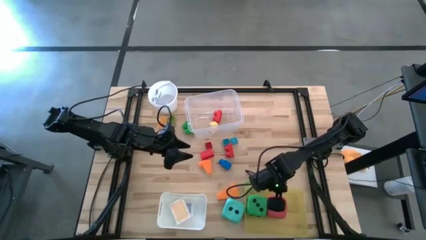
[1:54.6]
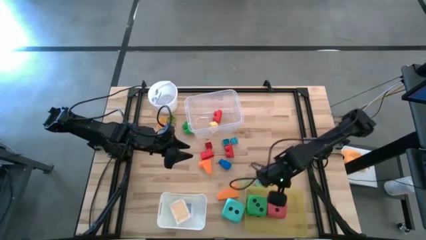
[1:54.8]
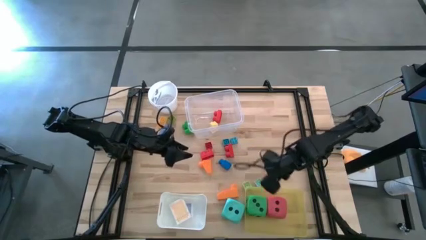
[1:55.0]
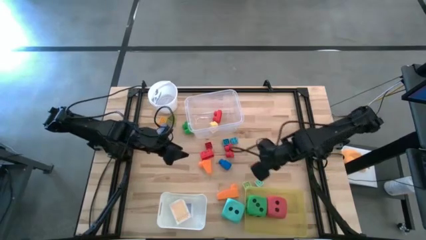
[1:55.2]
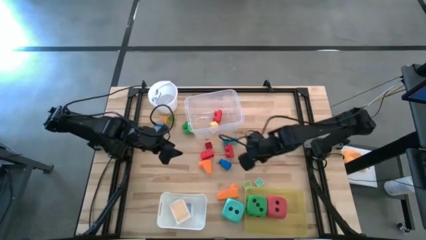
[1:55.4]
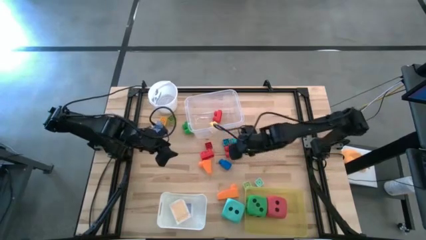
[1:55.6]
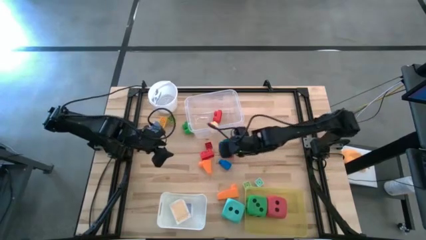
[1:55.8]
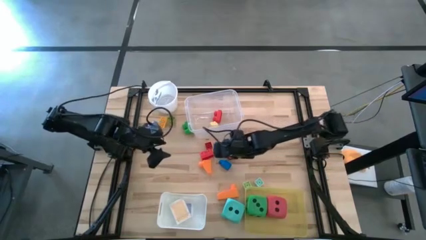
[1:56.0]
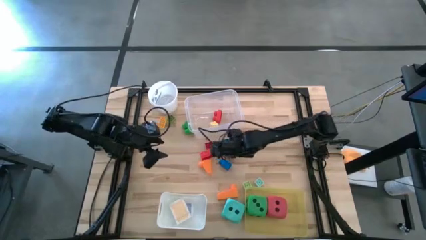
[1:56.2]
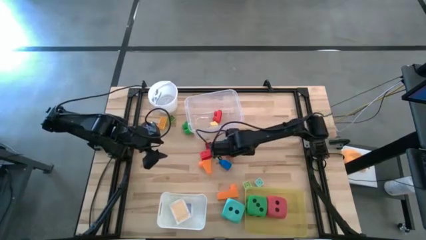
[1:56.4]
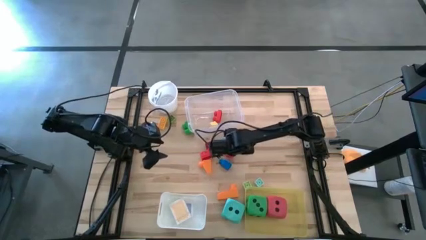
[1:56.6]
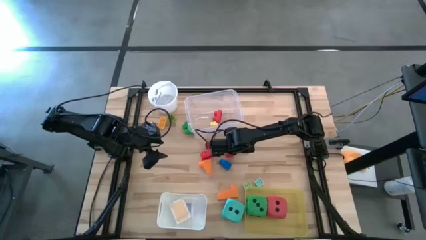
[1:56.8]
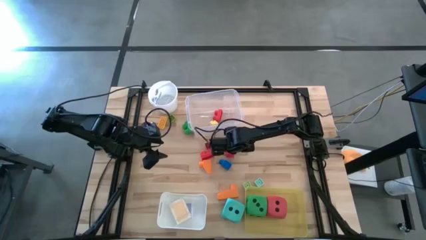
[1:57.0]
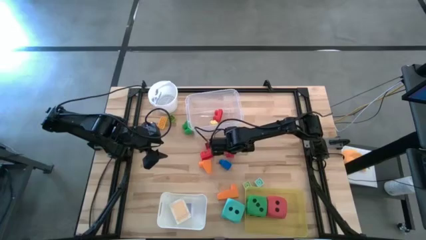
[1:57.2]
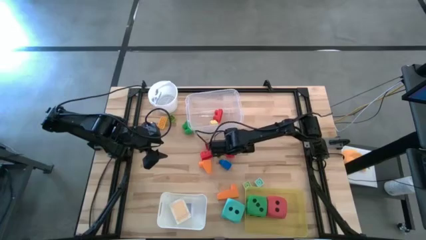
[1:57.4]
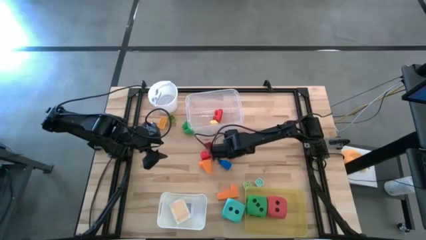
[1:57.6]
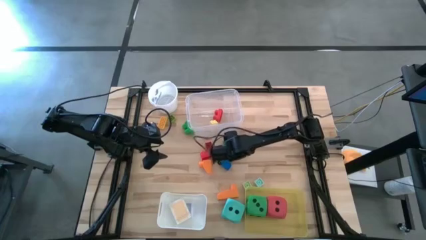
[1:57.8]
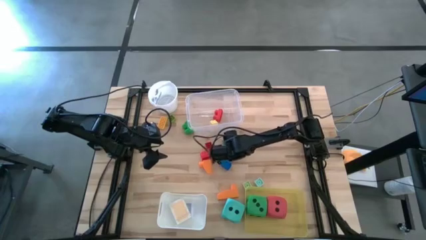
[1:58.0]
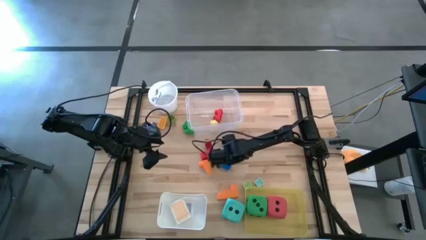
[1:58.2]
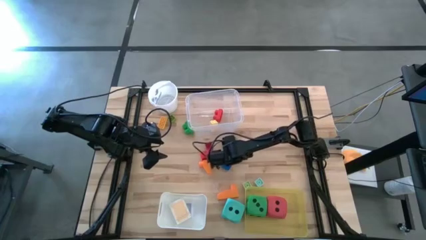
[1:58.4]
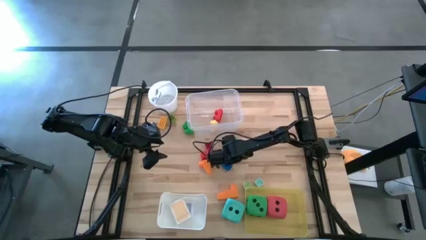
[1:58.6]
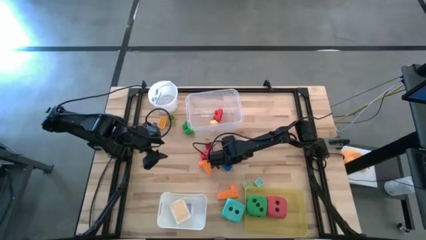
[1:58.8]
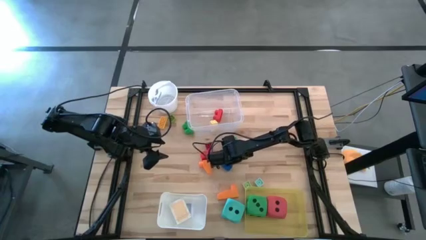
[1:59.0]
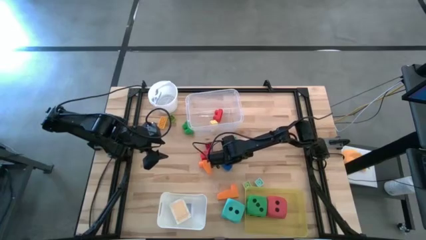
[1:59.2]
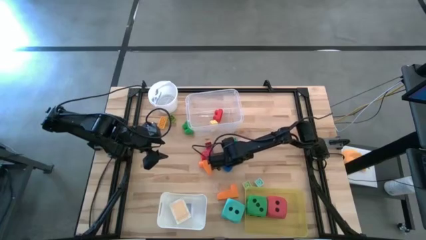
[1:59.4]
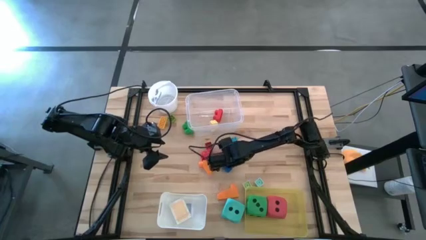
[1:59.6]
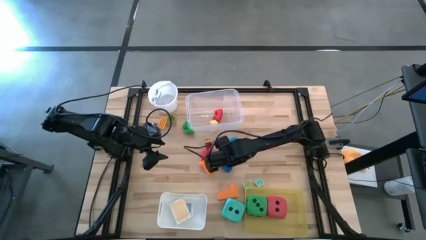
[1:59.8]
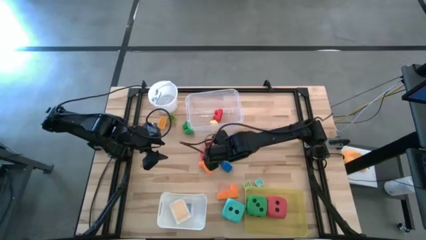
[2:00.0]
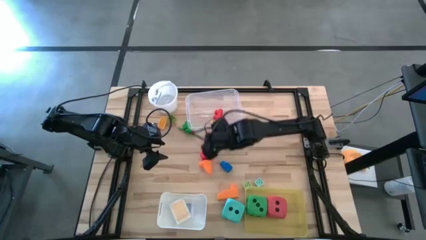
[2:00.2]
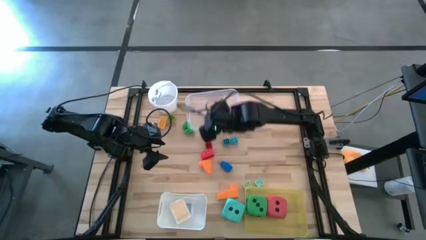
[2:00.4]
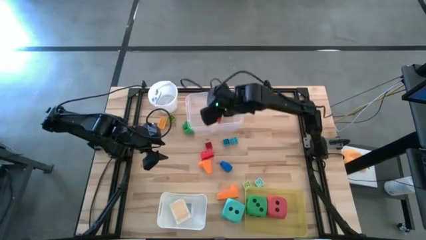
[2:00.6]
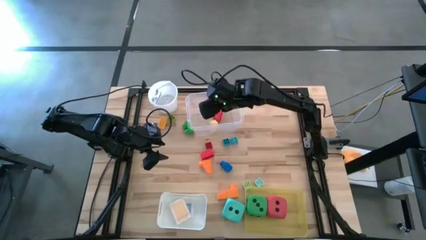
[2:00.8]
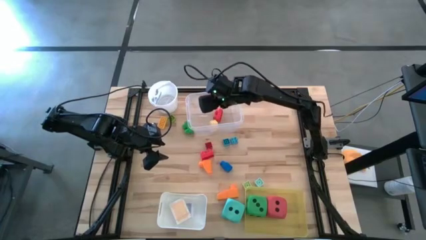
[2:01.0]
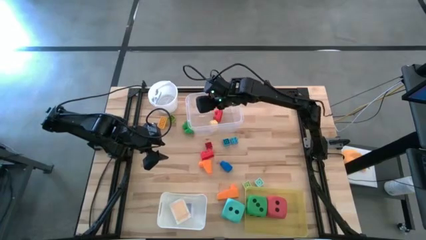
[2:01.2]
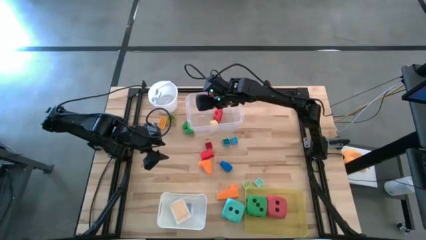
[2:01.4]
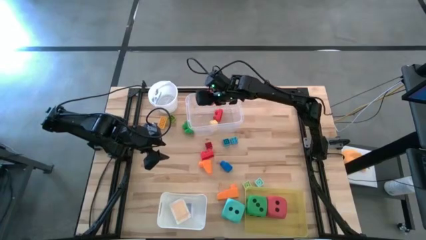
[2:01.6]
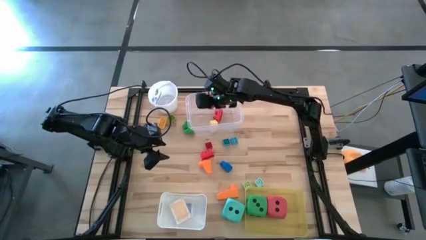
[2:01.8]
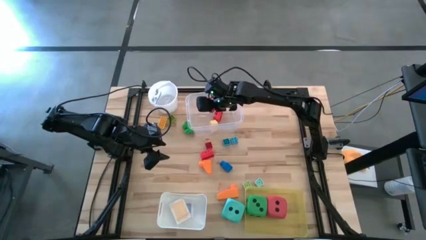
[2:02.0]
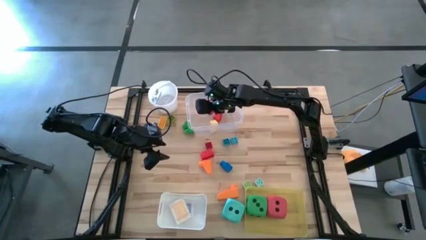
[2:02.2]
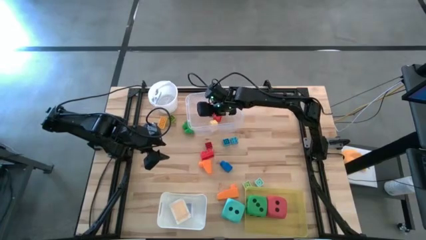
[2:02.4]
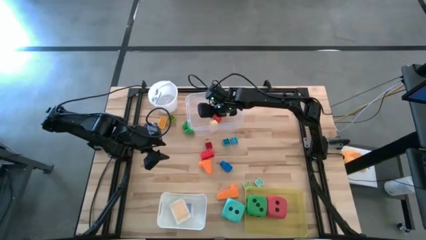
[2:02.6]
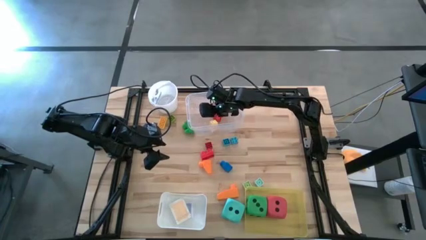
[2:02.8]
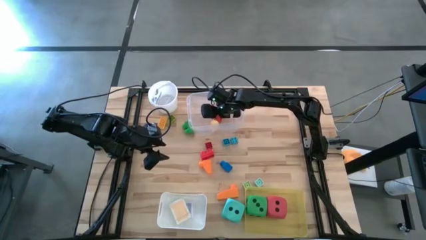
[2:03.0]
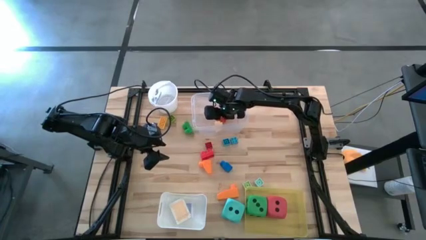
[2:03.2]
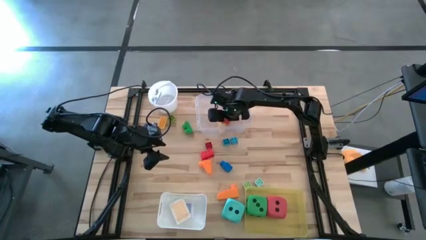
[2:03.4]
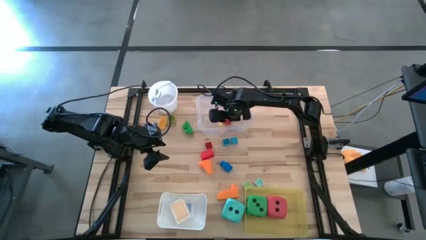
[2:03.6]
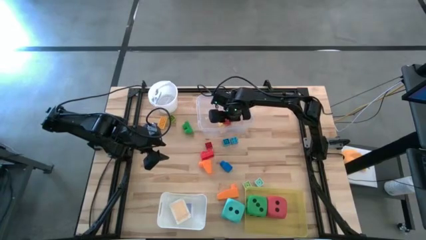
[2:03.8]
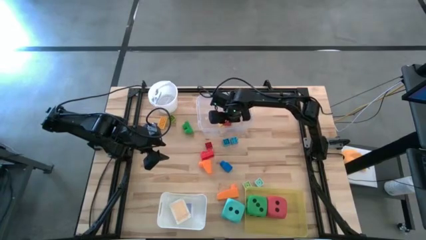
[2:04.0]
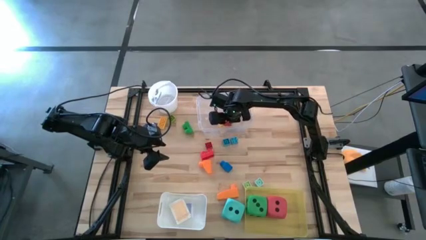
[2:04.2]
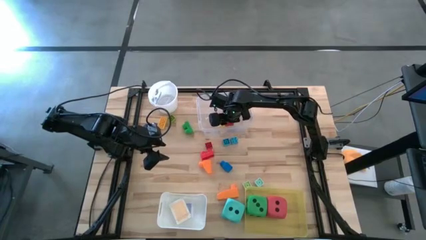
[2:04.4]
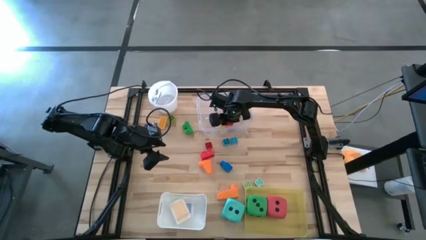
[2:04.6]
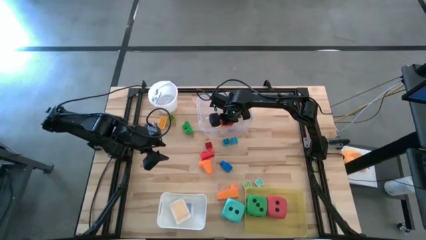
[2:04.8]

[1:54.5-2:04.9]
Task: Pick & Place Toys
Put the red game piece into the transparent bin

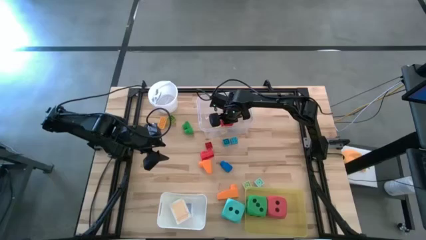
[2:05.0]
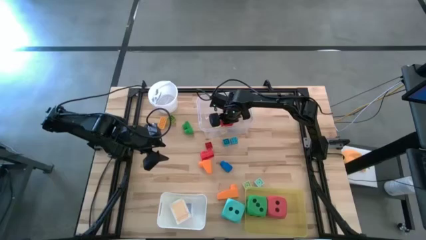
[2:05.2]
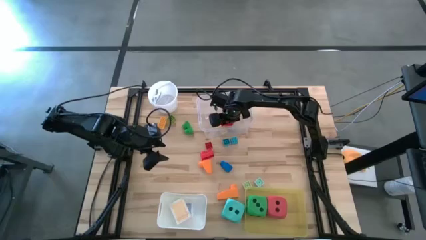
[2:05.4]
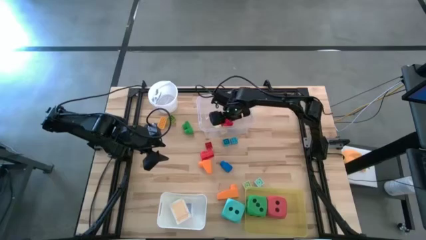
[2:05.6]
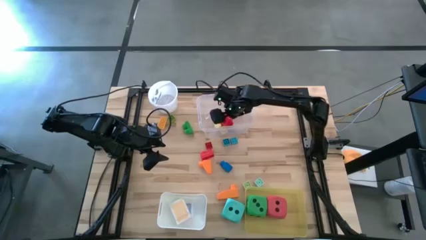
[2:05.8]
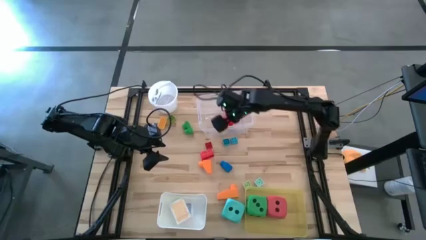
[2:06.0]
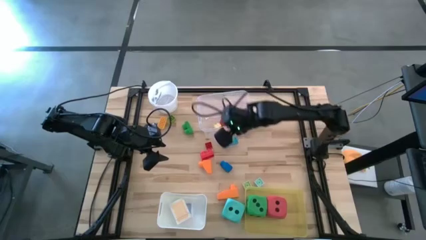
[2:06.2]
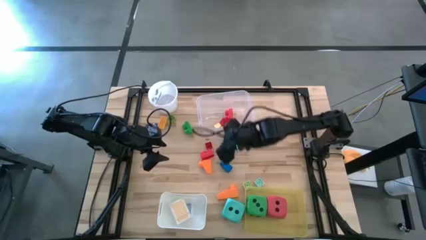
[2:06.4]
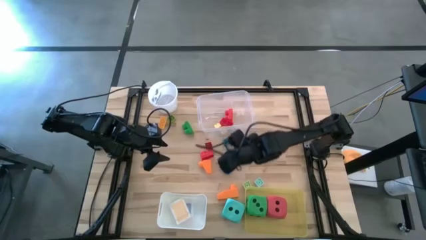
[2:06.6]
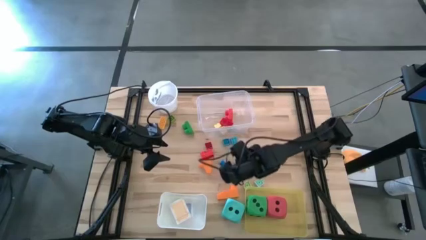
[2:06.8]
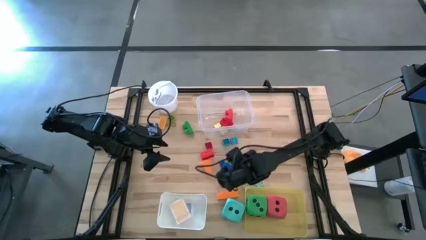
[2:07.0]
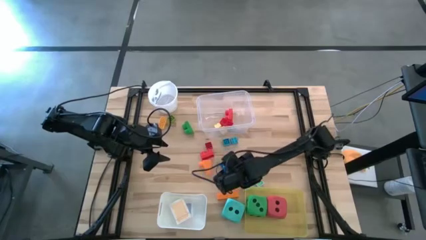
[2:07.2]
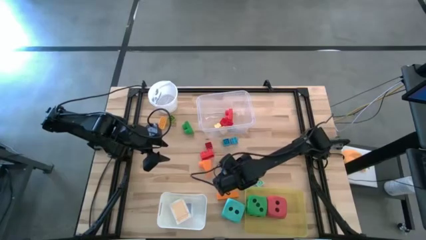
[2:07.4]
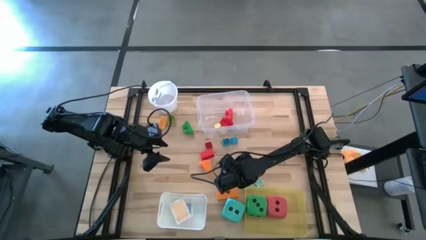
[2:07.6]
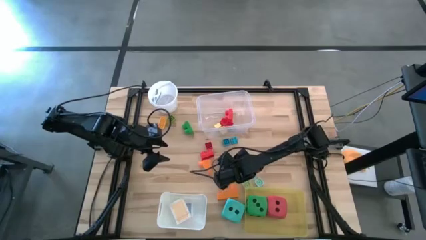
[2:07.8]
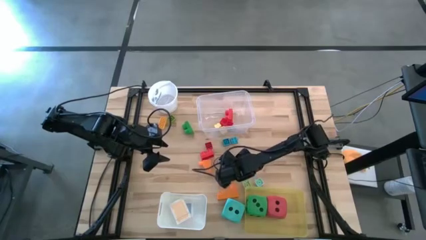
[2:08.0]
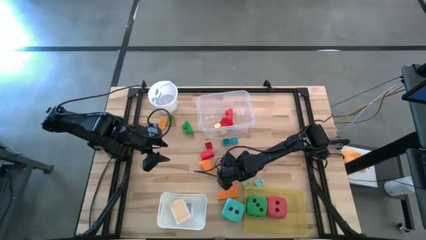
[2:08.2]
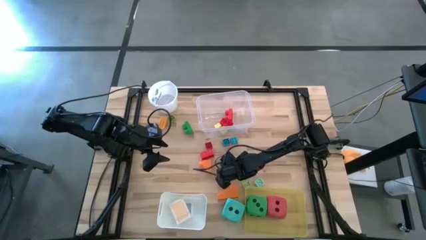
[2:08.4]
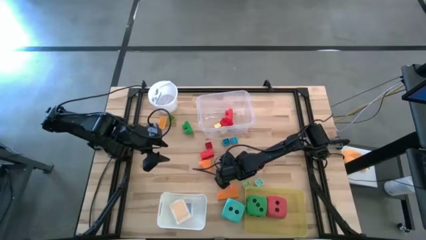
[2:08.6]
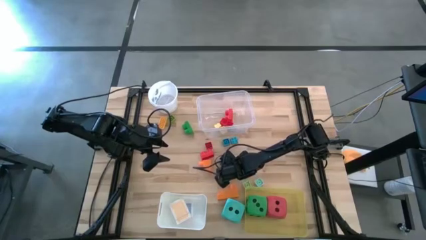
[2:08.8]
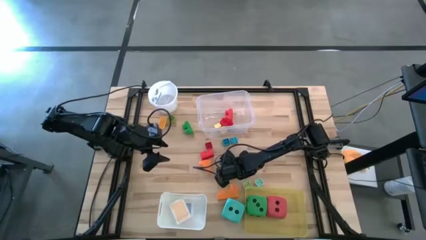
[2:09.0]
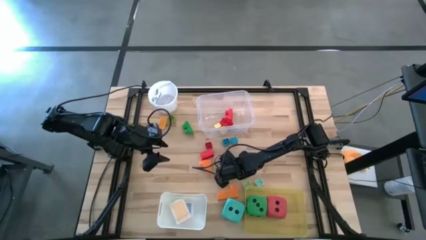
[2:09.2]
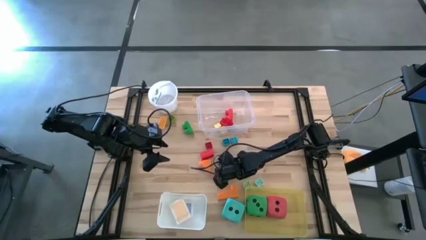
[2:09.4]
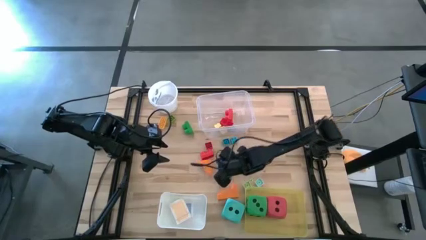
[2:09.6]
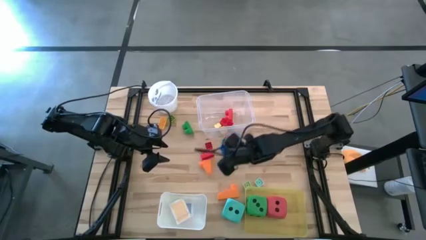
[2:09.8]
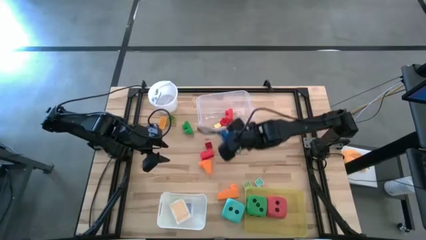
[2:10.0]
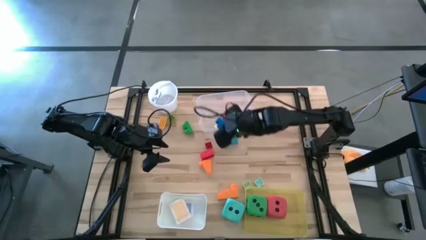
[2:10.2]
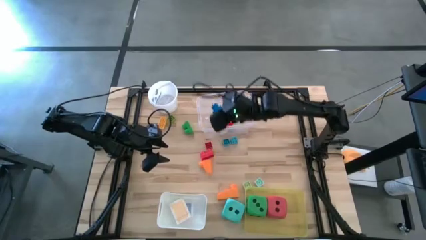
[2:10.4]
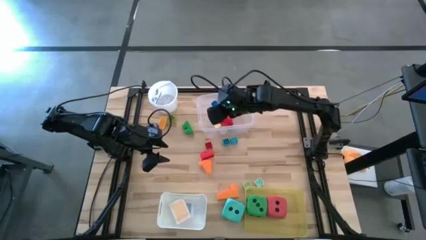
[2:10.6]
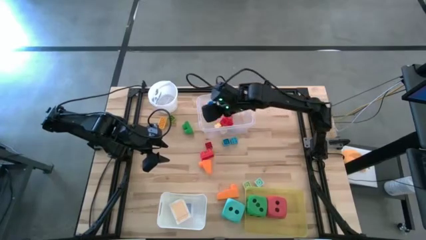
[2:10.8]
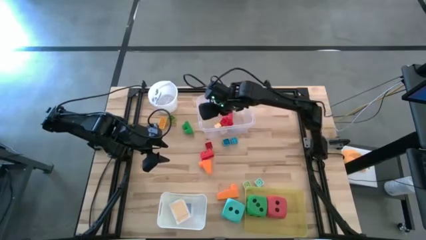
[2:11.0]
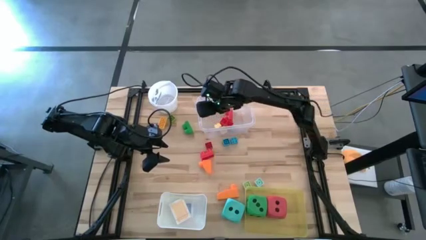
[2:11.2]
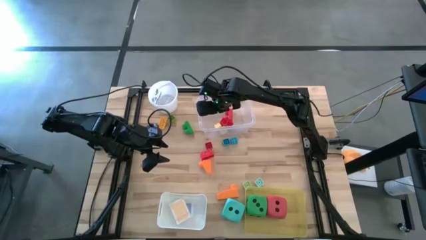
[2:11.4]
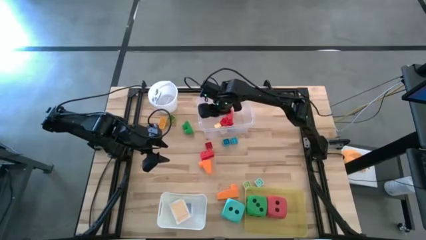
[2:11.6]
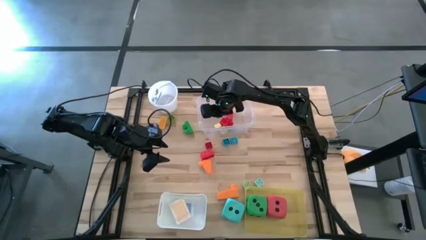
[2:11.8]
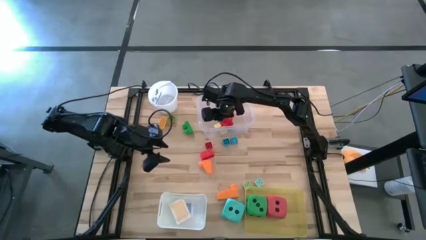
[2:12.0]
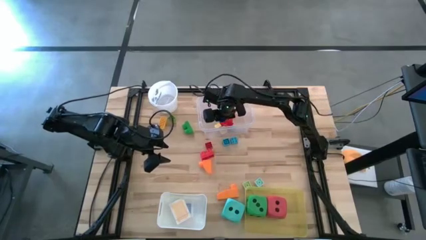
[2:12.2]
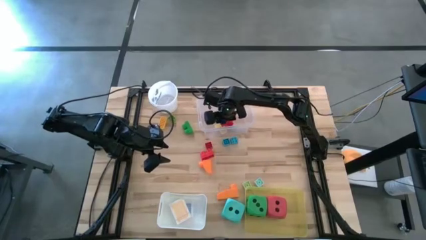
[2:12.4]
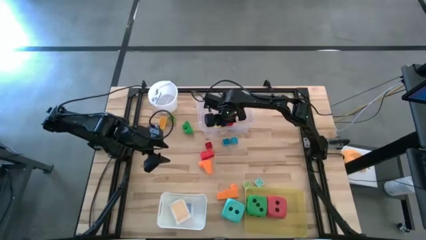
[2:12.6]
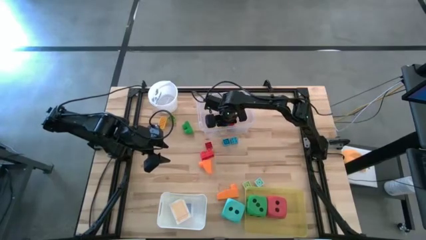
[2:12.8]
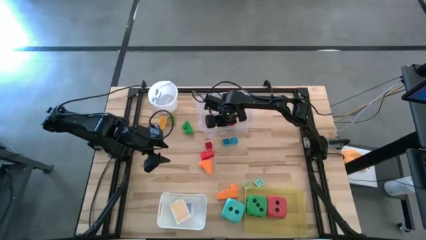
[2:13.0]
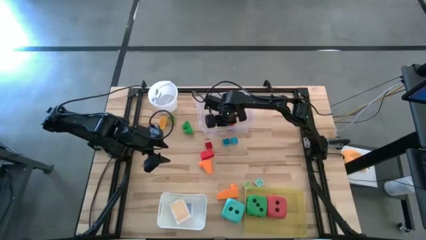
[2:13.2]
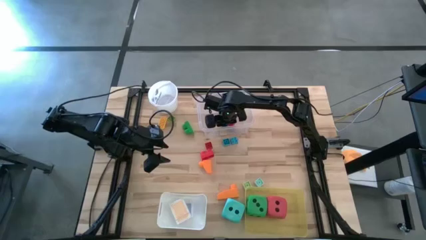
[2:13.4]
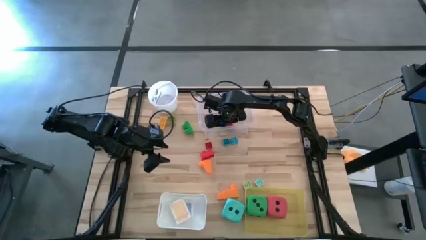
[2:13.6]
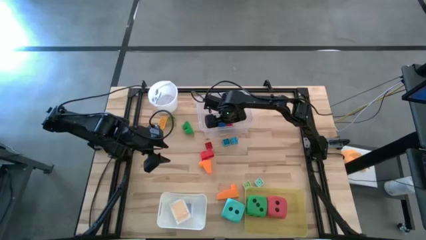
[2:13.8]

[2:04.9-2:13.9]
Put the blue game piece into the transparent bin
